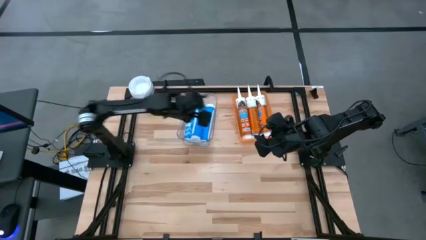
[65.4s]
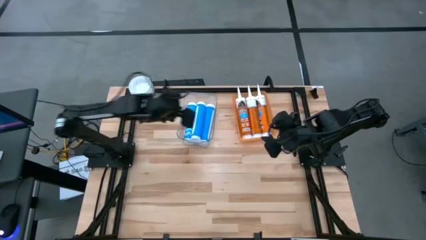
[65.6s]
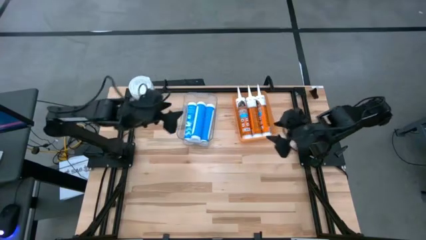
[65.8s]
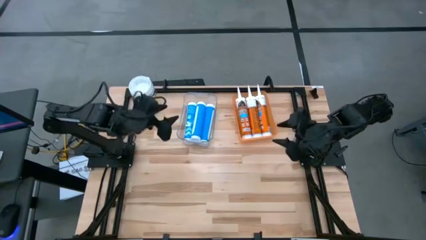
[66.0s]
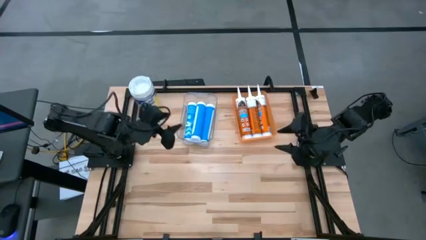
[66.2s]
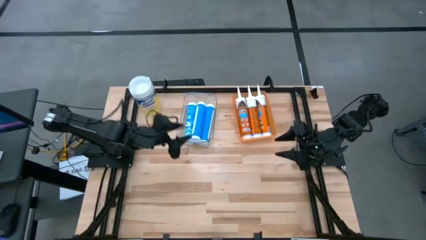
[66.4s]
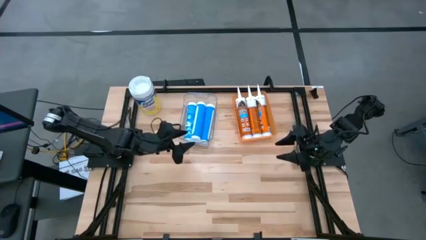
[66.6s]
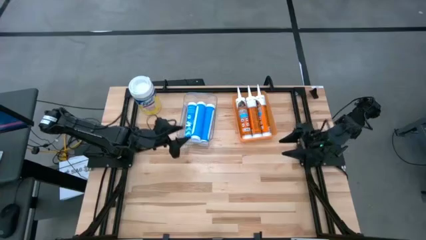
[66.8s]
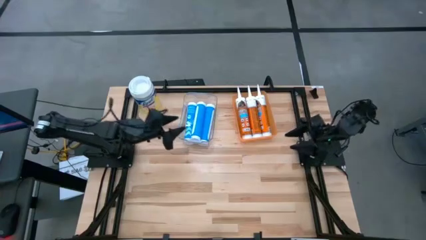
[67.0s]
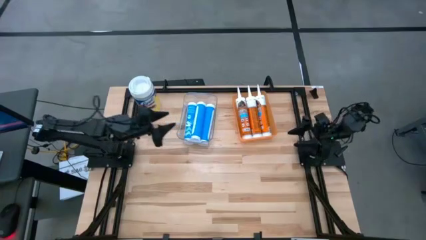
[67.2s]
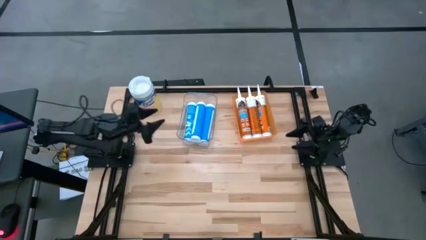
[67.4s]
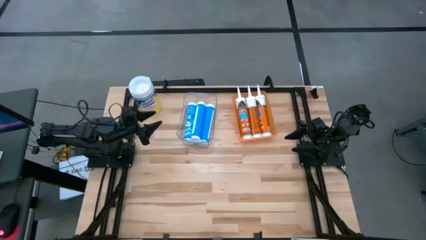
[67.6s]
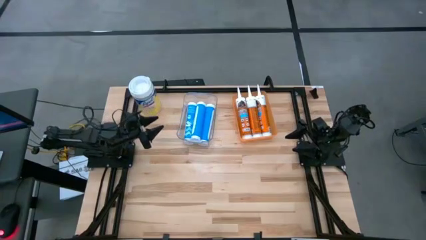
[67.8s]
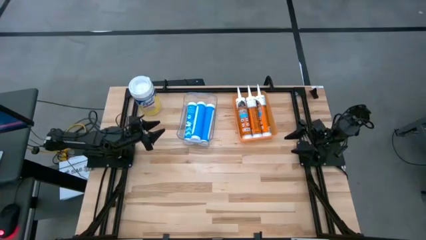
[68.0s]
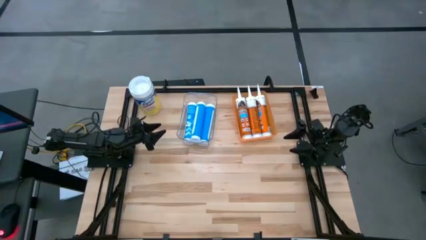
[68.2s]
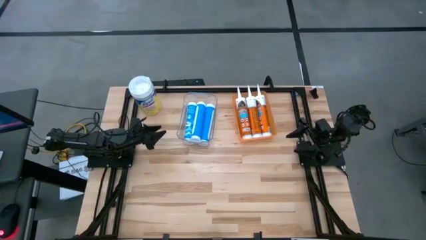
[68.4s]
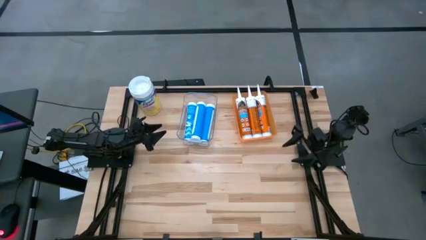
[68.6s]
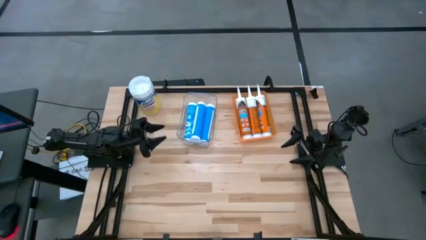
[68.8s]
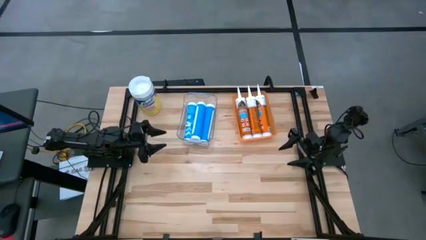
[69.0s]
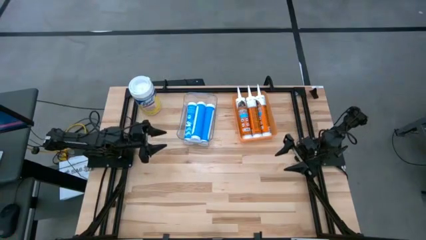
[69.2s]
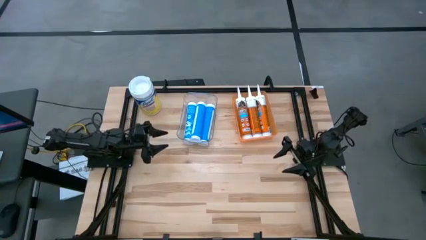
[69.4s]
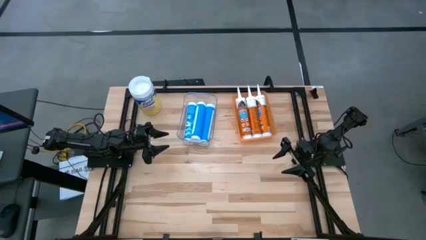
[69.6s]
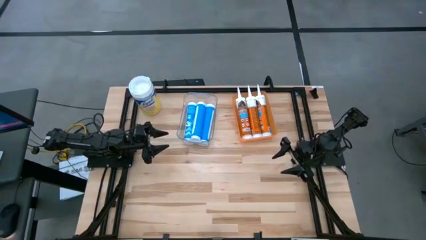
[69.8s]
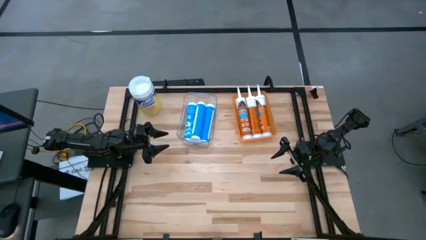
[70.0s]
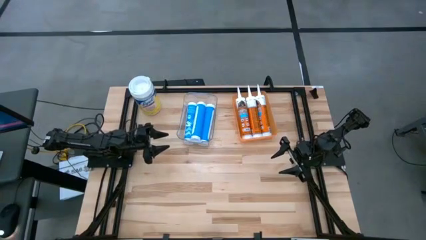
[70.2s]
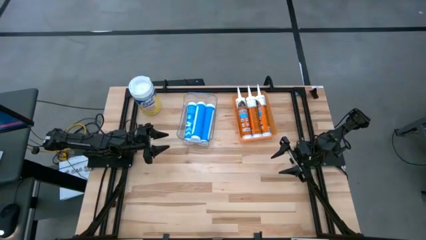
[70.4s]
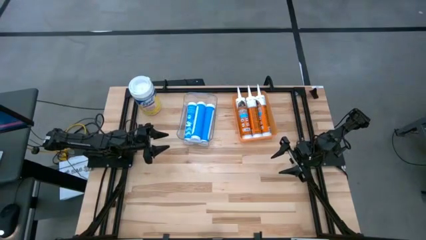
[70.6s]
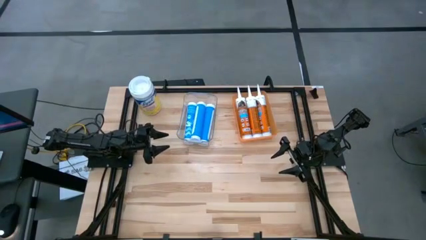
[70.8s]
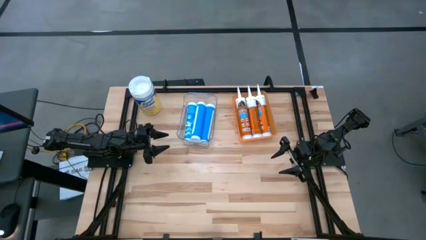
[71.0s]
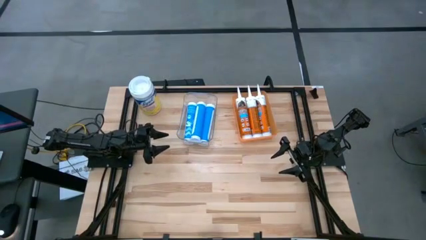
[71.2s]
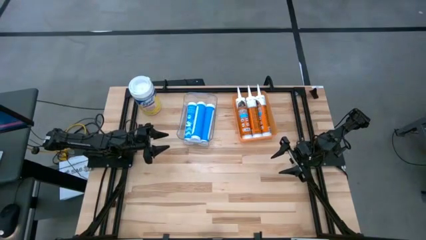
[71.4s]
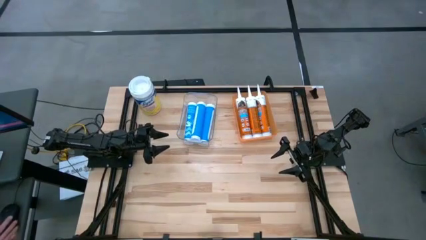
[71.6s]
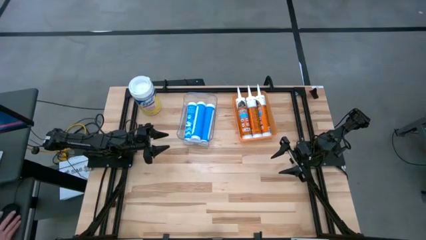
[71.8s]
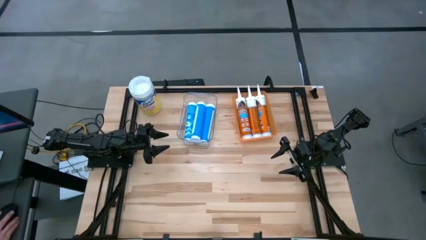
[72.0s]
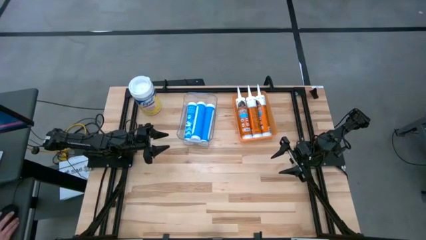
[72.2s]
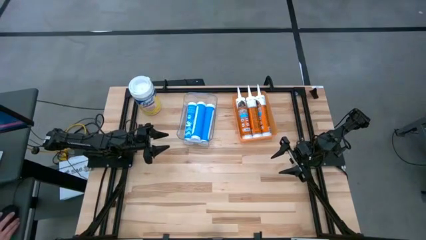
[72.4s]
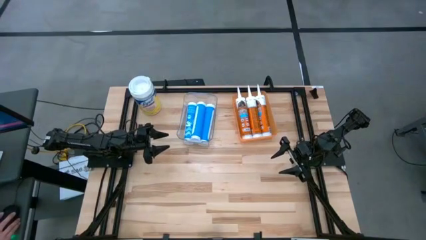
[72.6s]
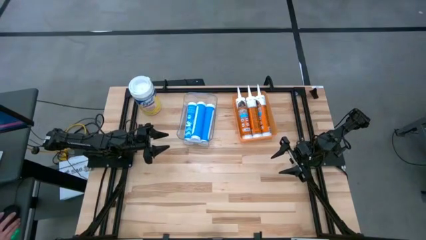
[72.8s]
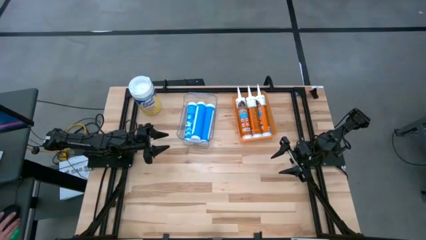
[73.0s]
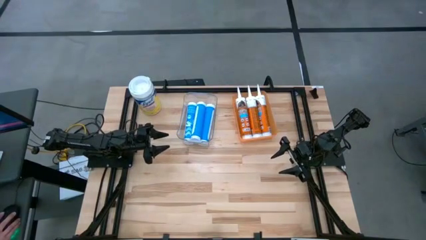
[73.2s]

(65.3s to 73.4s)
Task: Pick & place silicon tubes, Sealant and Lysol wipes
Return to Home Position

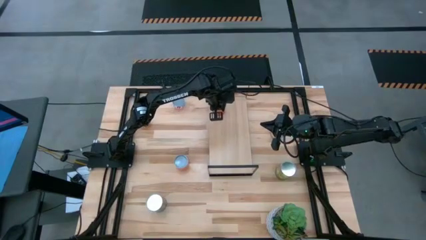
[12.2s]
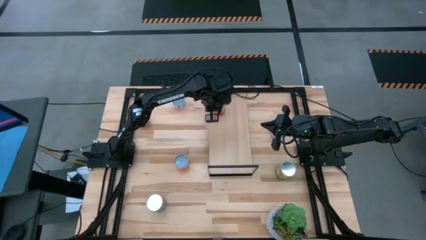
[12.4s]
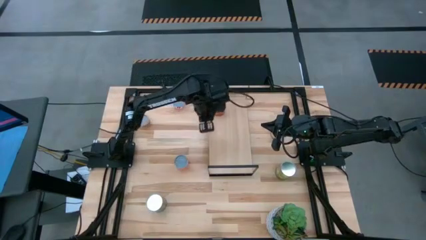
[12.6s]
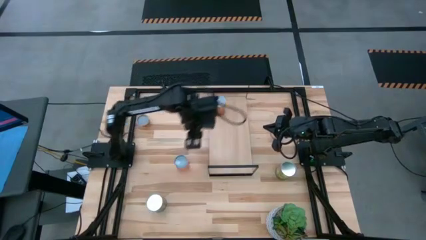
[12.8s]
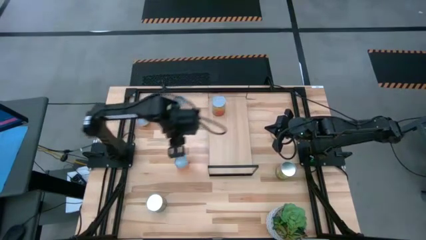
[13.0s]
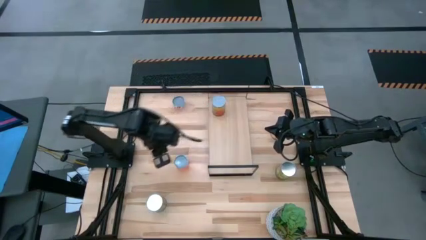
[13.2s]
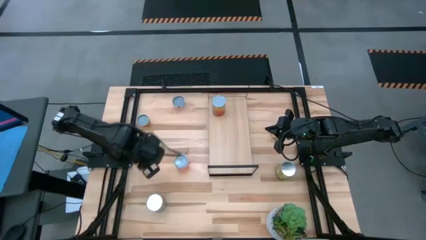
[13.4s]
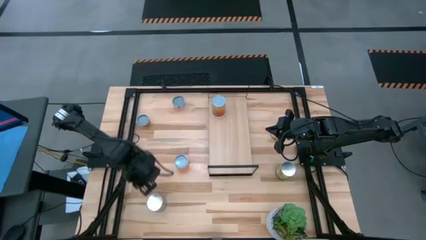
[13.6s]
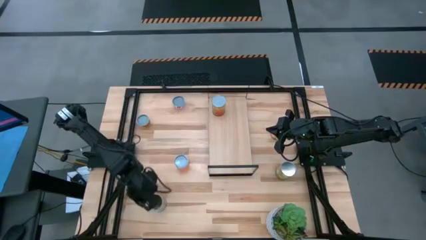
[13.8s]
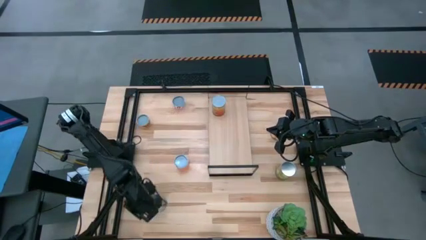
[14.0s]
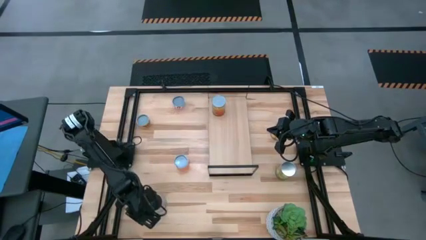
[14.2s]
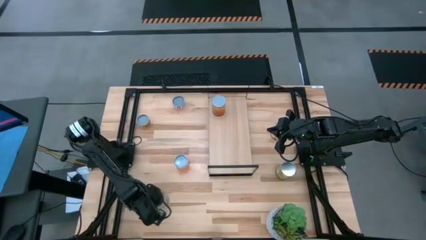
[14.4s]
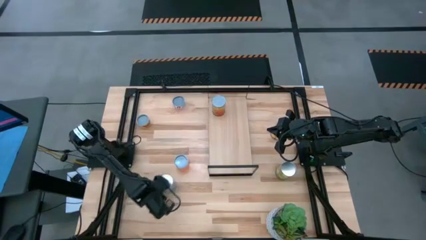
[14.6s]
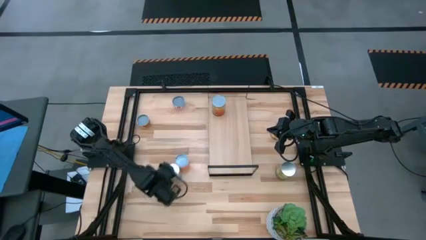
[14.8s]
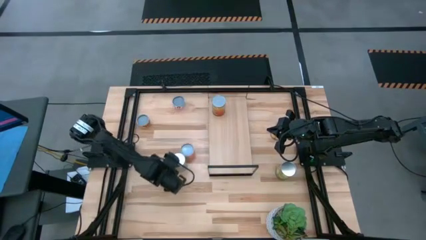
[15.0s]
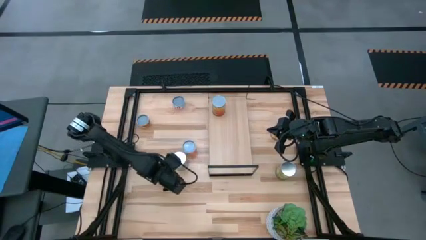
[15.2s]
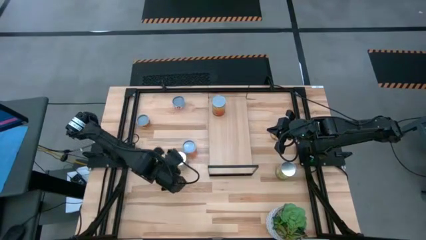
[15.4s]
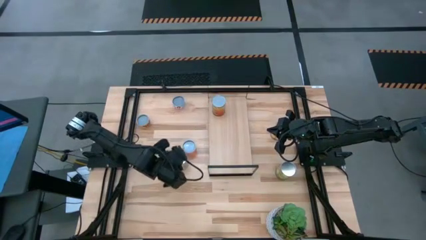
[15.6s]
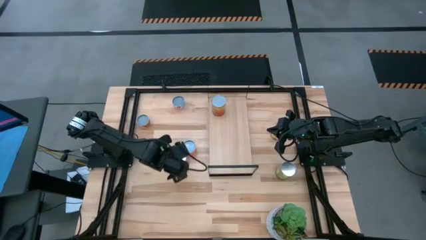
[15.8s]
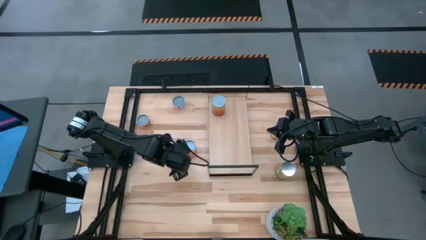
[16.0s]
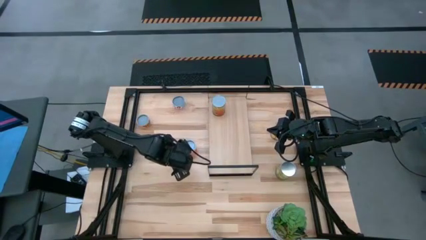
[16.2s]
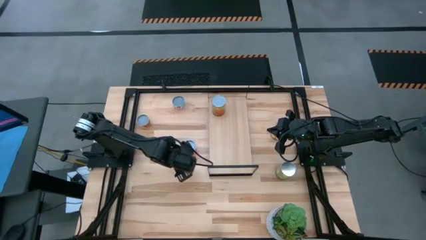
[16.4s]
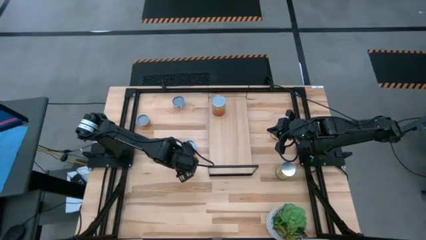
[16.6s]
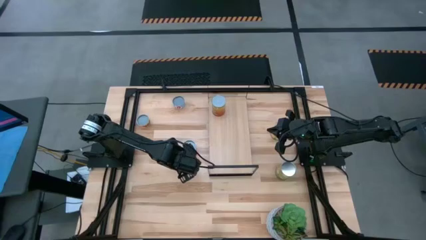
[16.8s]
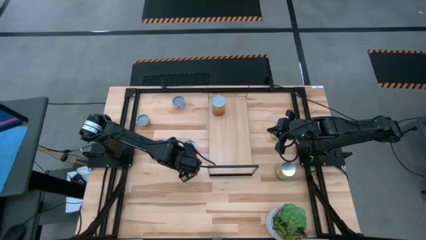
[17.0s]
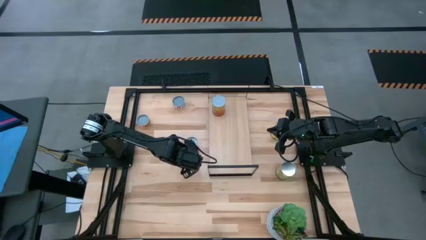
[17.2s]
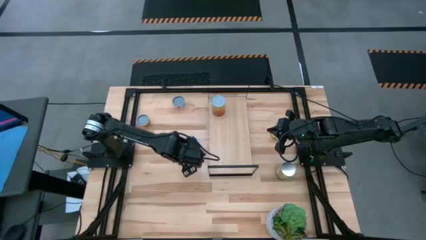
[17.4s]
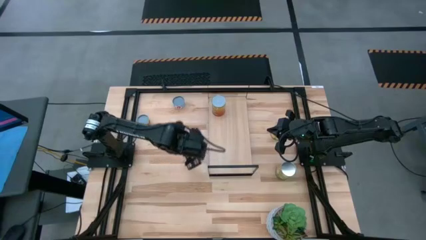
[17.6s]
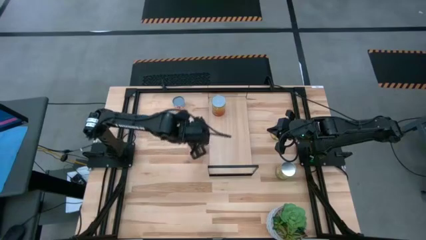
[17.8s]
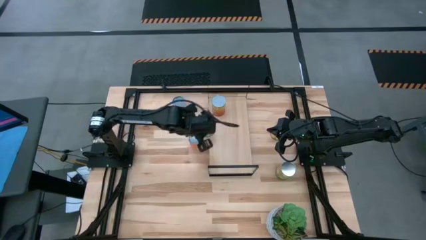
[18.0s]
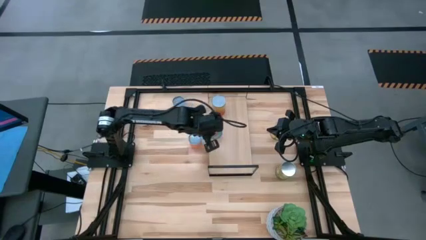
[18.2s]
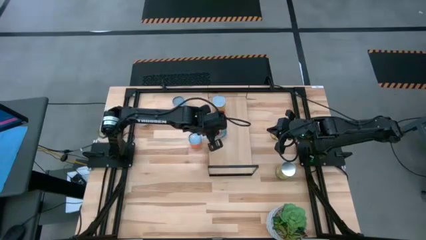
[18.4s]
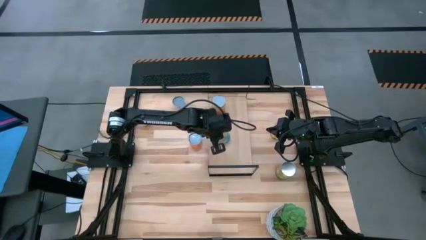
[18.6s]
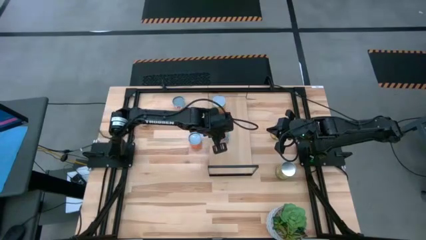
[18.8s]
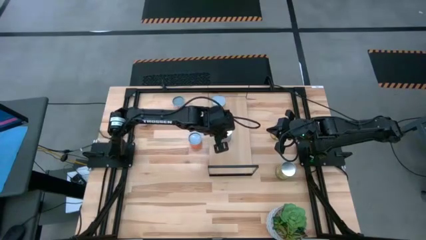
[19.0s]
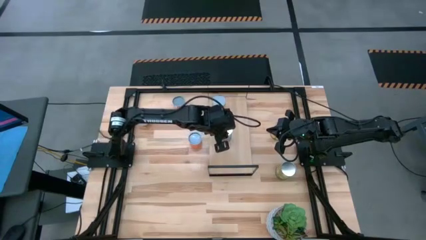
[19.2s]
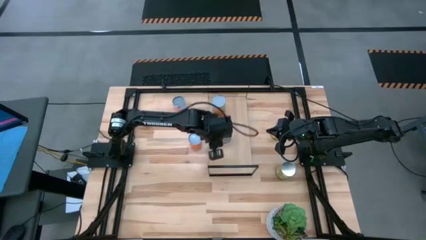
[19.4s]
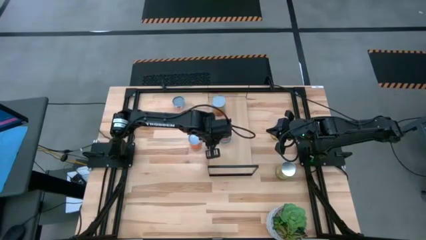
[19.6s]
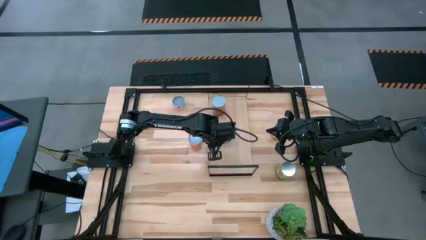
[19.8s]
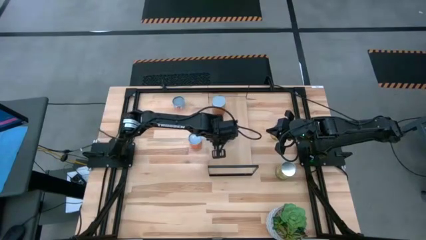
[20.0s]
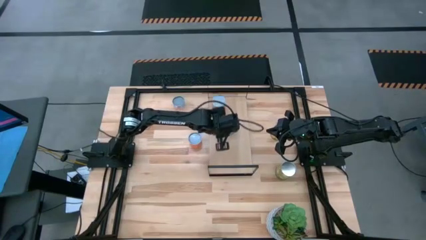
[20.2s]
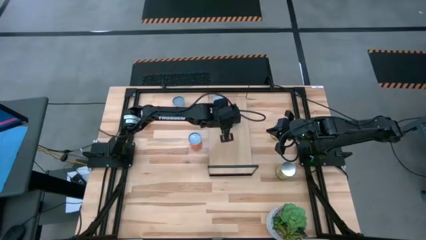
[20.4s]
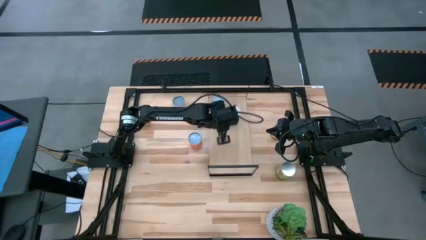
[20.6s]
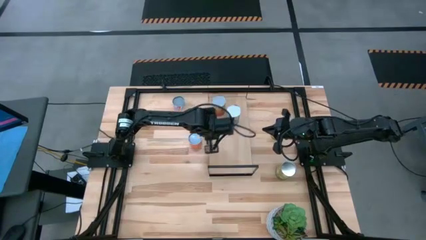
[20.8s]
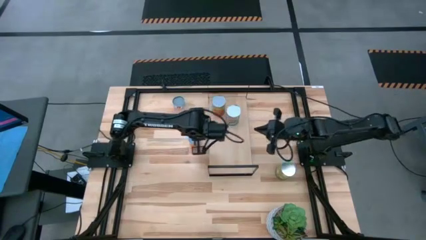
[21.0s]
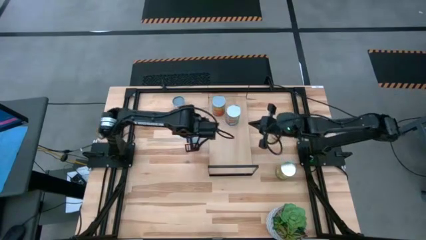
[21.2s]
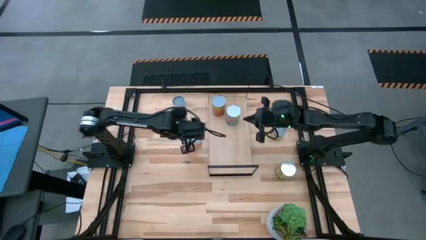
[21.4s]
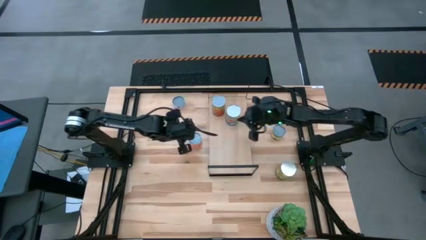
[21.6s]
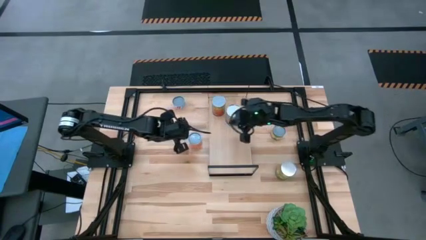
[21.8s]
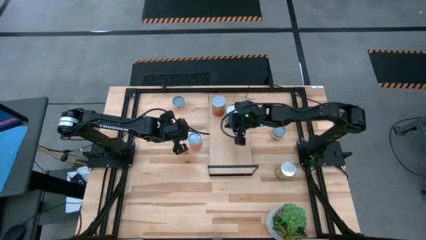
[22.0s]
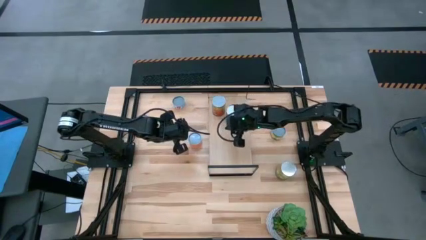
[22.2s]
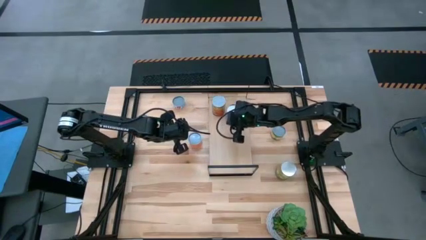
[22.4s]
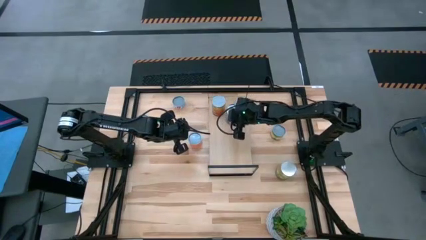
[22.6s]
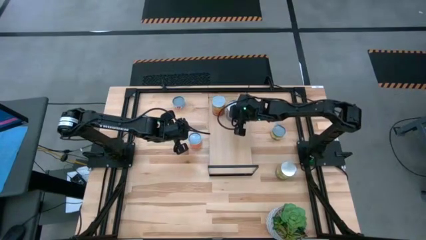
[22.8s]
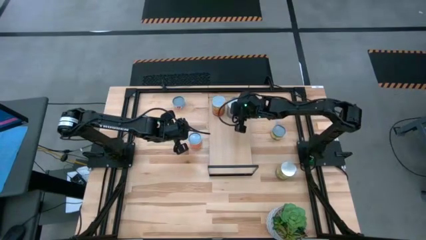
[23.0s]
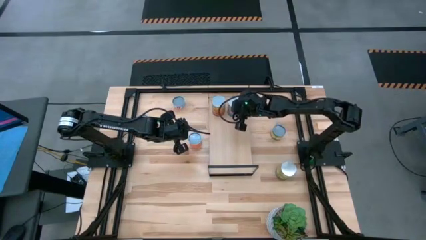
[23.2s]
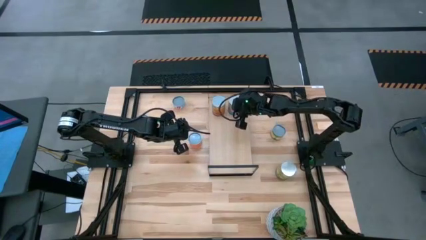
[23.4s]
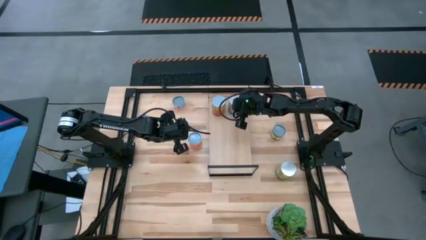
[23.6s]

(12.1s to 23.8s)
Task: Pick and place cans onto a shelf
Put the canned tomatoes on the shelf
